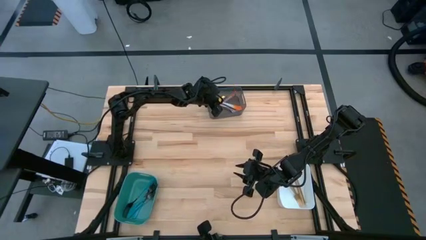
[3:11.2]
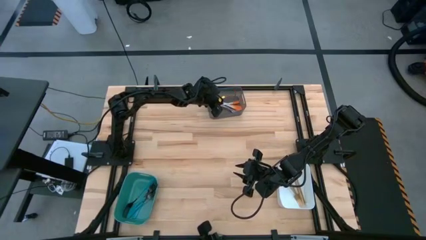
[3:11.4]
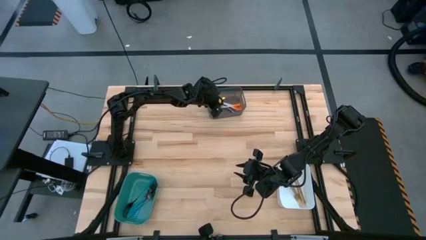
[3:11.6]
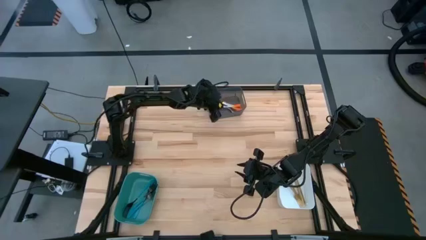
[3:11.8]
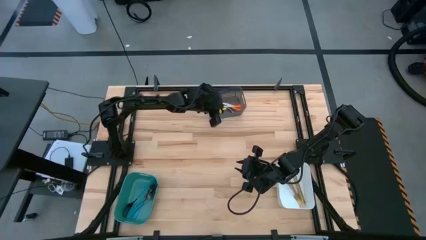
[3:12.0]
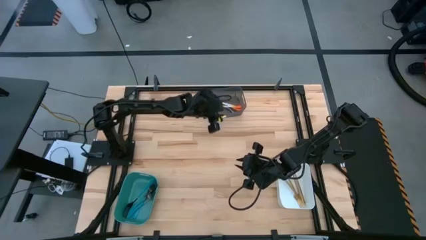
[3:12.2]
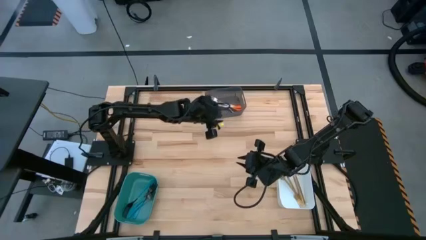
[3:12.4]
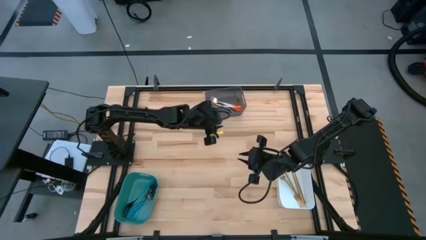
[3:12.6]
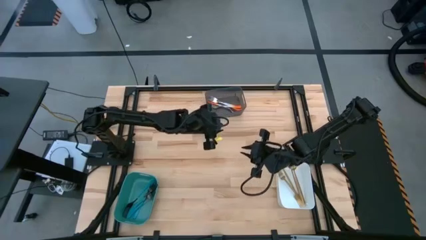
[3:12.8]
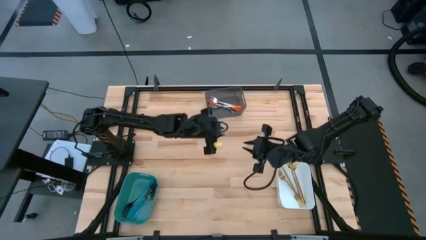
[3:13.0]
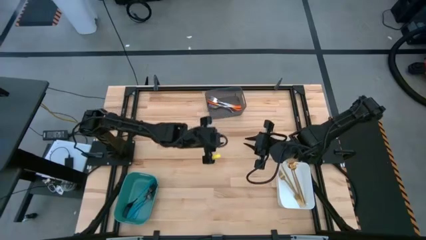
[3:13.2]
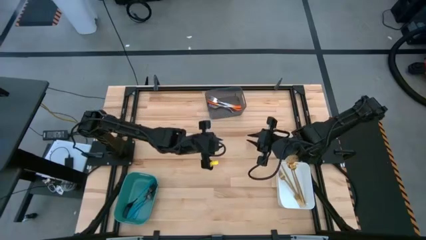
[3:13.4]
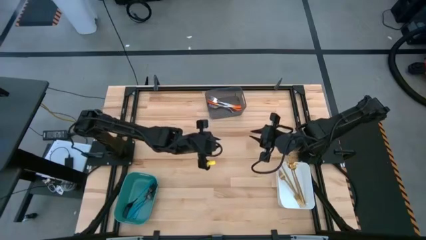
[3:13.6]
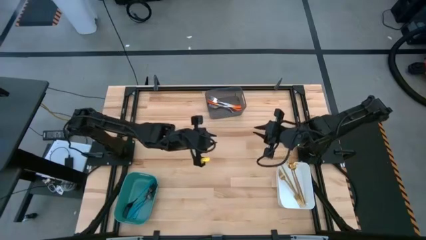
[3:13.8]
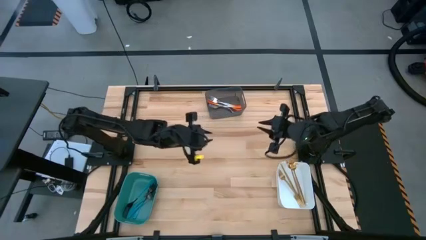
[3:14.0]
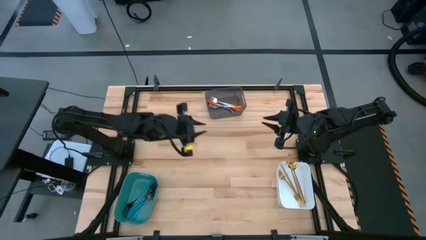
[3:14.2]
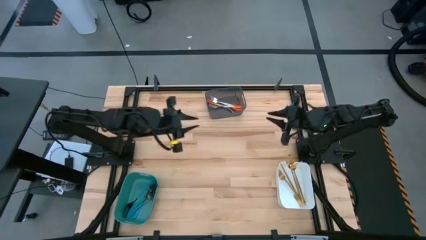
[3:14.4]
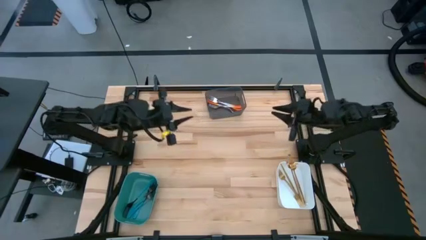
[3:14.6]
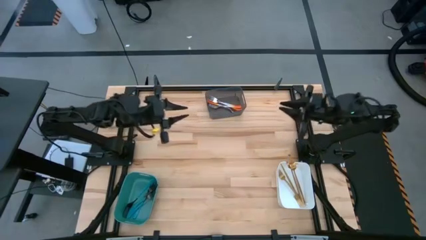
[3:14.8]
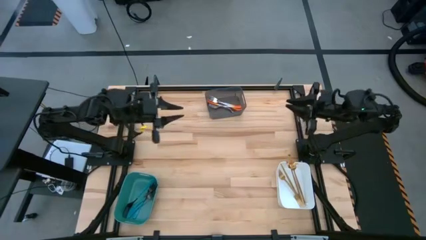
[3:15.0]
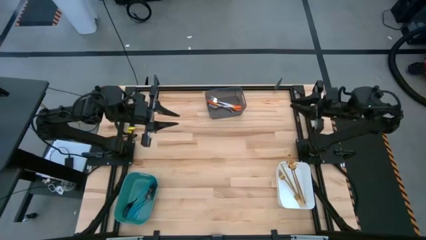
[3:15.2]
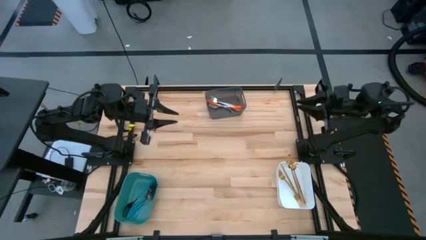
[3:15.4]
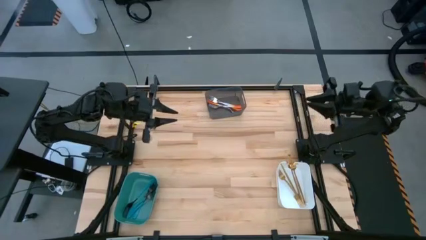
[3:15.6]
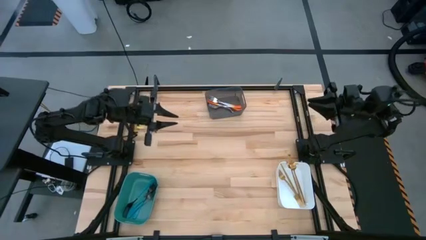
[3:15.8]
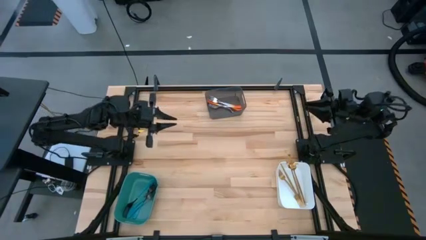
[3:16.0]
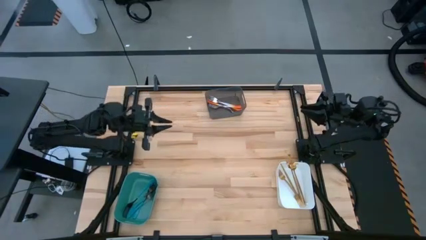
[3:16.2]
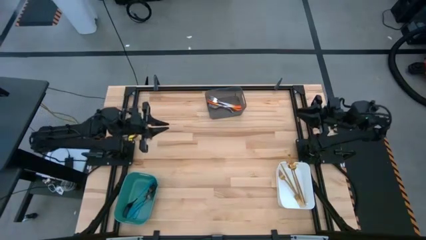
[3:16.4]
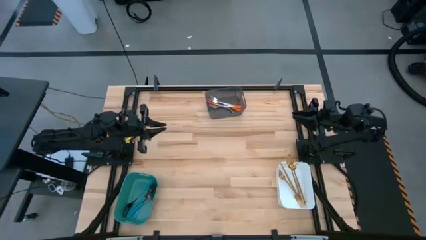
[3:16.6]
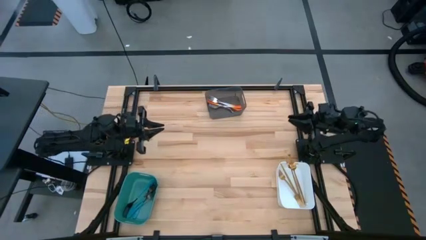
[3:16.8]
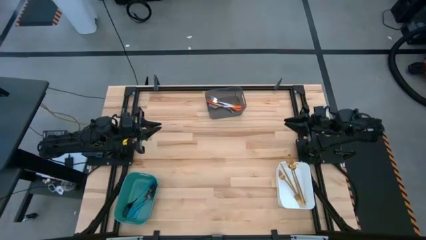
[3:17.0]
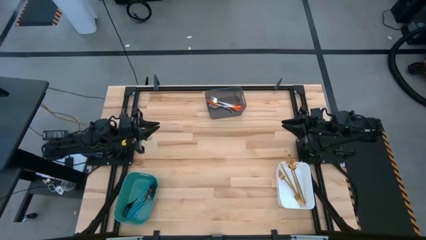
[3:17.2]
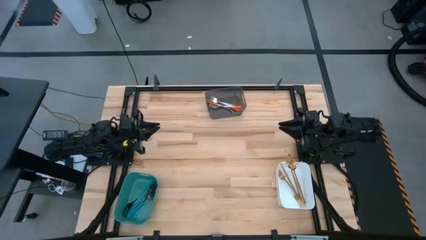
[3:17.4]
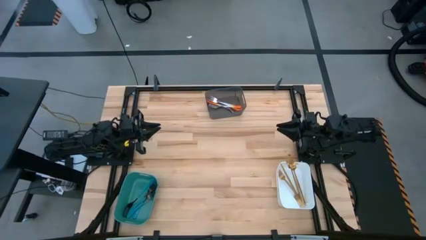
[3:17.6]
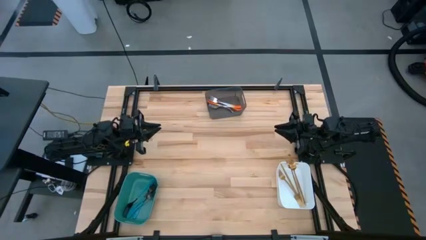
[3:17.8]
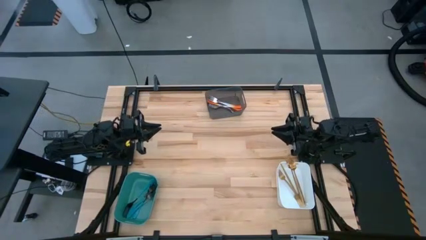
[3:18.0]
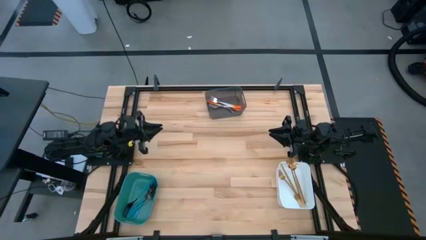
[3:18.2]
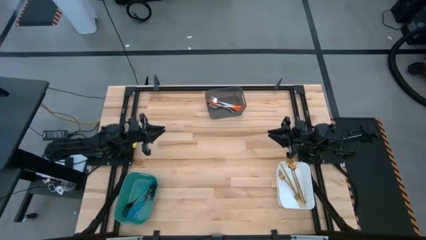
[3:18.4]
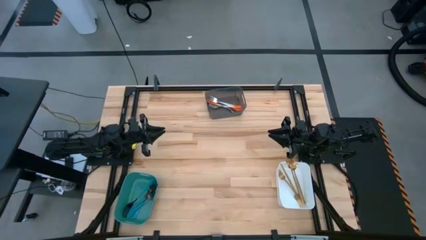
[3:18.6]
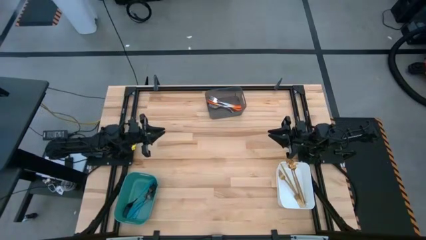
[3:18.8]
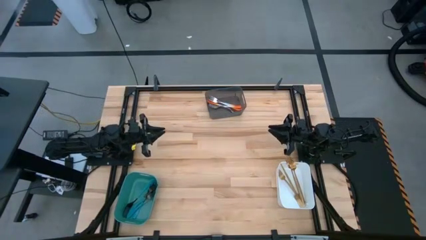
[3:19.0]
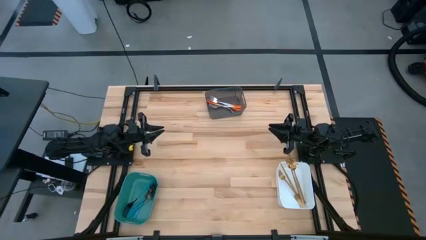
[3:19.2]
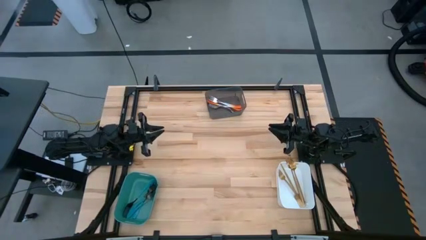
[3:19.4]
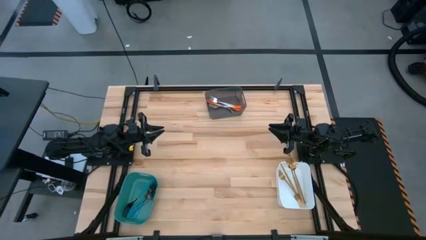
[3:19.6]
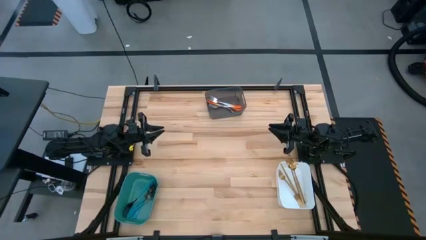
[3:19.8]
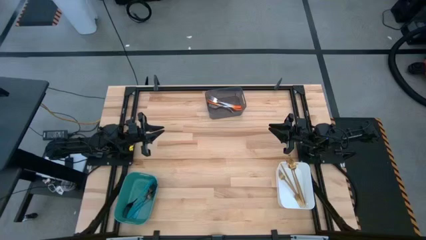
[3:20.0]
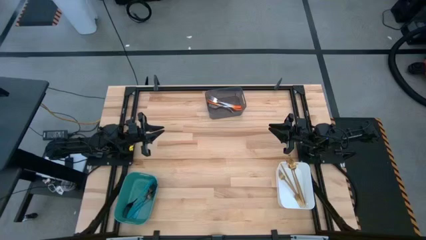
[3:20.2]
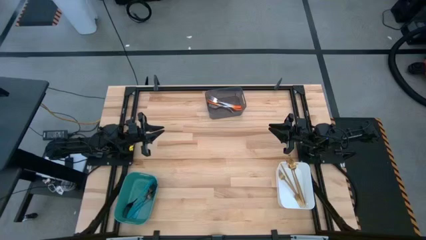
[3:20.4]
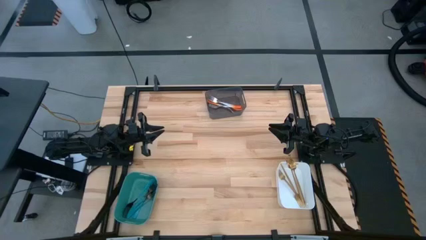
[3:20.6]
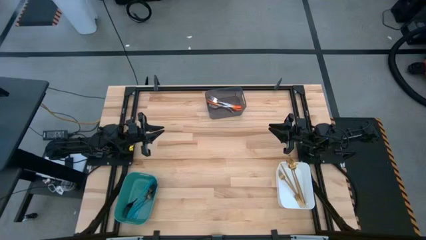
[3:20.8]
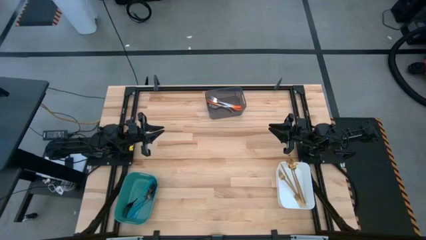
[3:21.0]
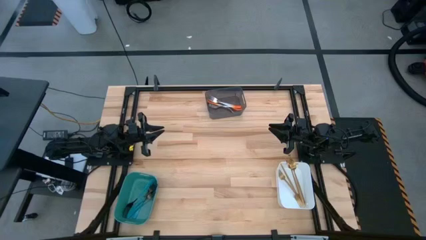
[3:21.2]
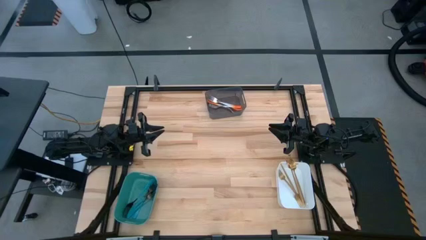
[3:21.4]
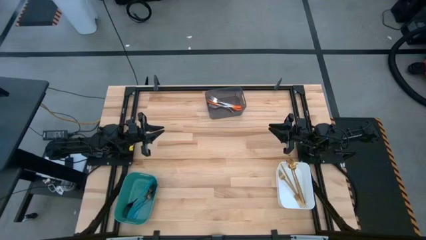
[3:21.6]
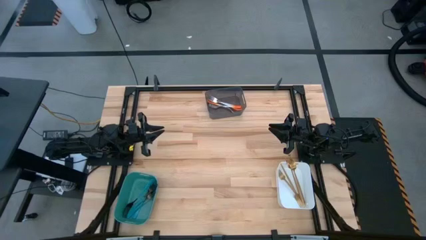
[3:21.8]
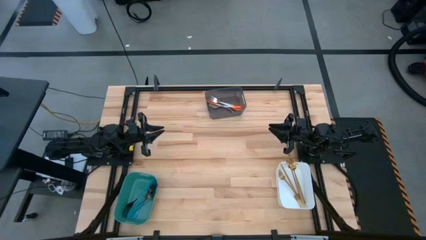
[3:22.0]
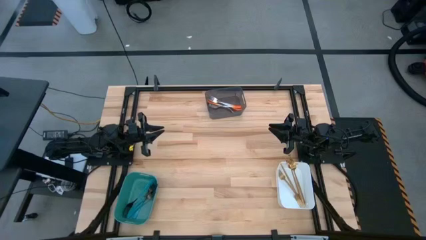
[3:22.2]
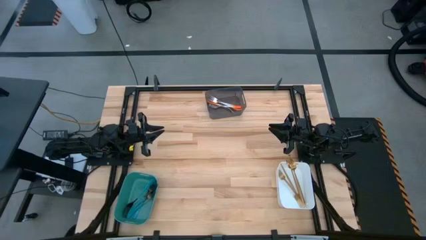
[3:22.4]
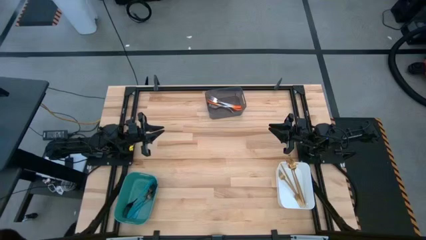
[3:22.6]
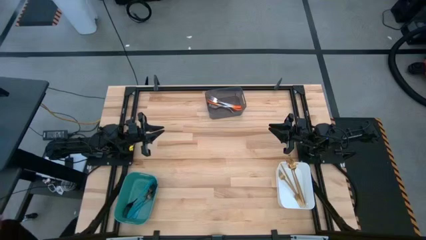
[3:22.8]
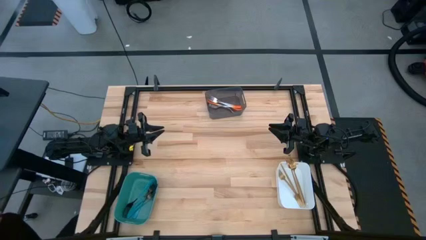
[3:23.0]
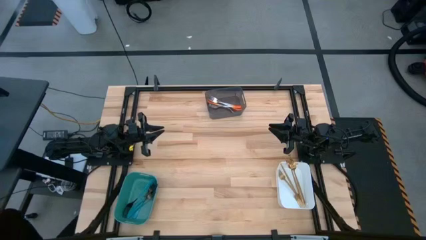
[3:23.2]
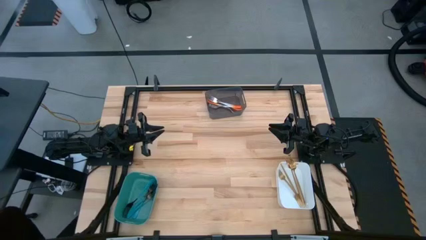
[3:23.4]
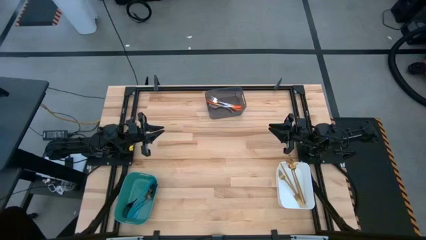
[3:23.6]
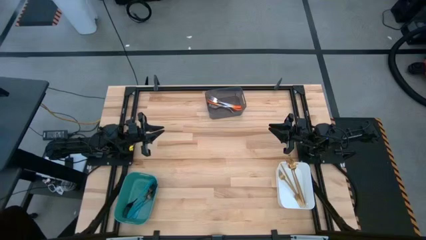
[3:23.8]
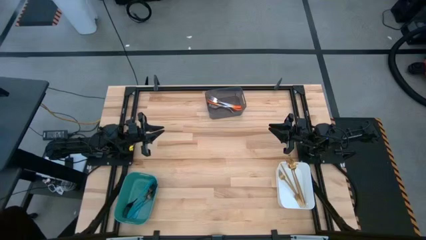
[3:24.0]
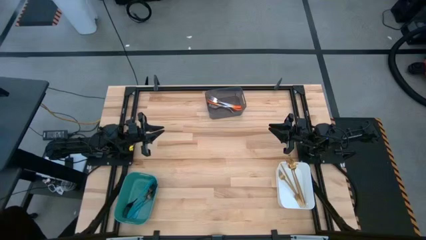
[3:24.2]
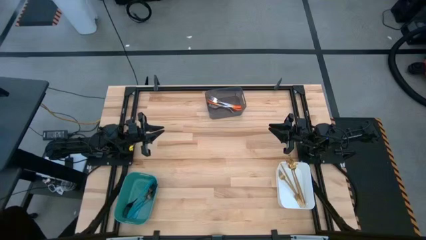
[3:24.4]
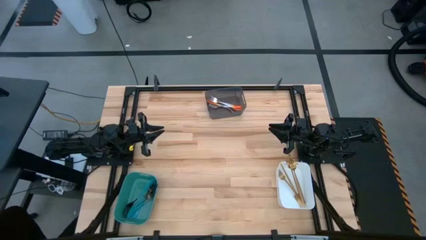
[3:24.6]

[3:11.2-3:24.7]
Task: Sort silverware by color (type)
Return to Home Position
